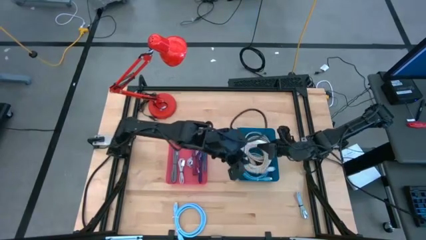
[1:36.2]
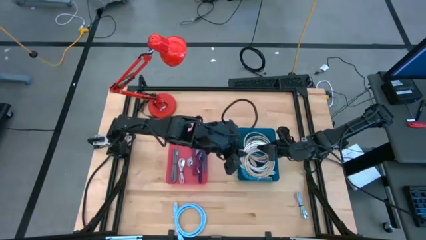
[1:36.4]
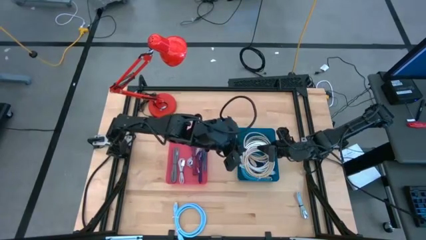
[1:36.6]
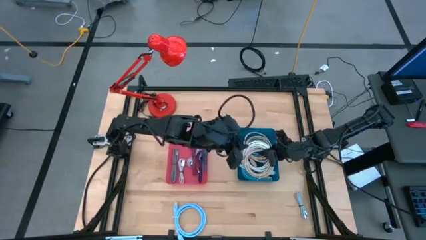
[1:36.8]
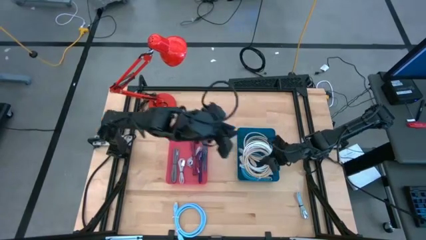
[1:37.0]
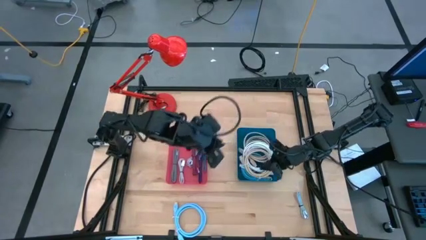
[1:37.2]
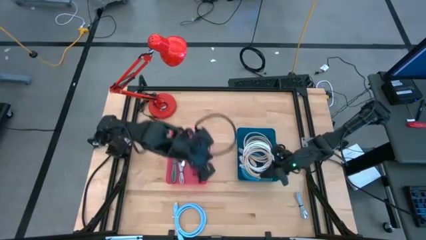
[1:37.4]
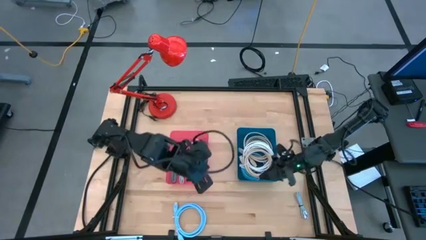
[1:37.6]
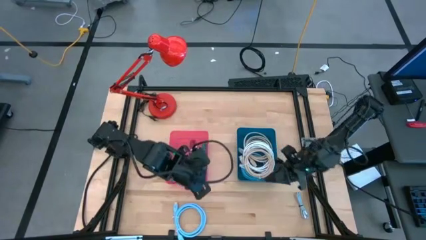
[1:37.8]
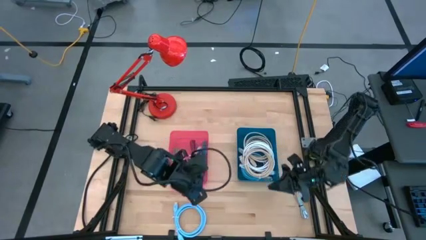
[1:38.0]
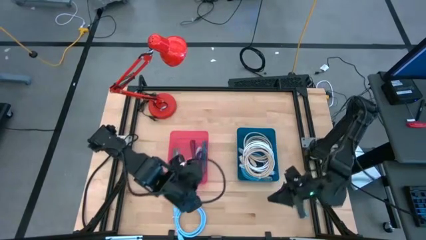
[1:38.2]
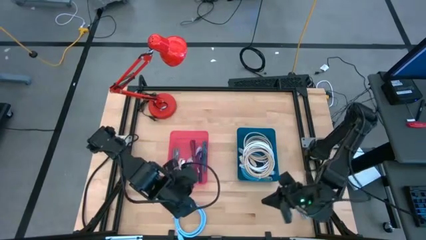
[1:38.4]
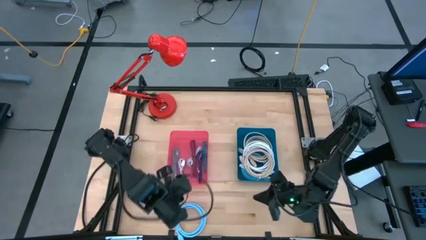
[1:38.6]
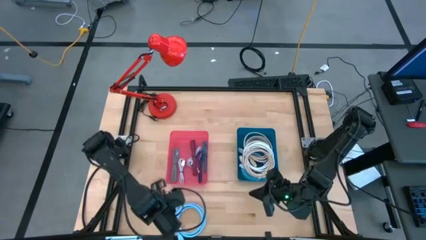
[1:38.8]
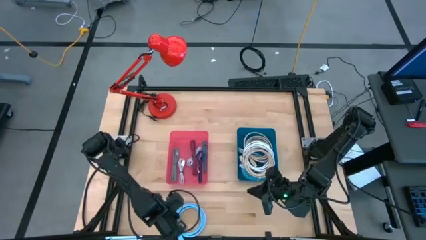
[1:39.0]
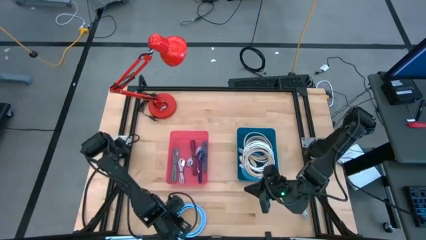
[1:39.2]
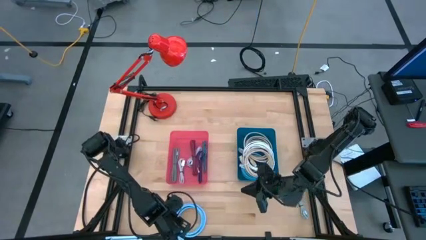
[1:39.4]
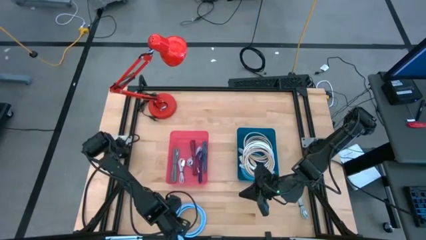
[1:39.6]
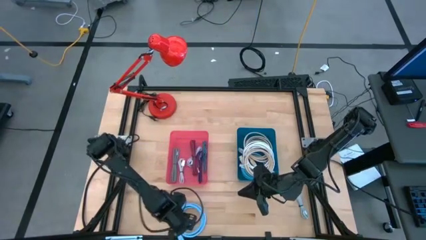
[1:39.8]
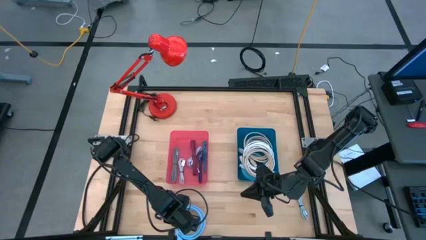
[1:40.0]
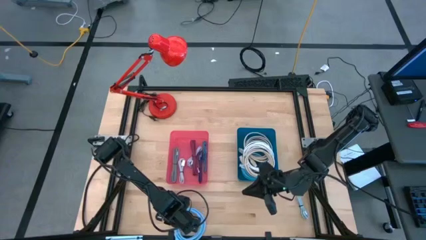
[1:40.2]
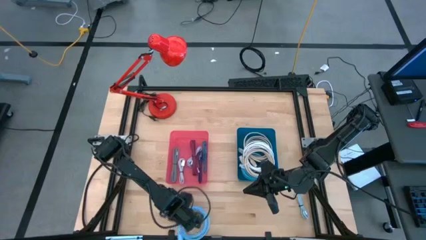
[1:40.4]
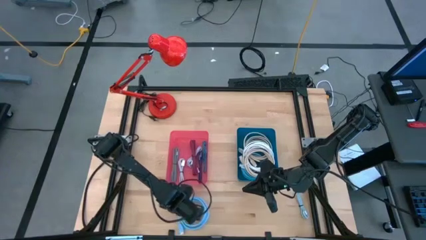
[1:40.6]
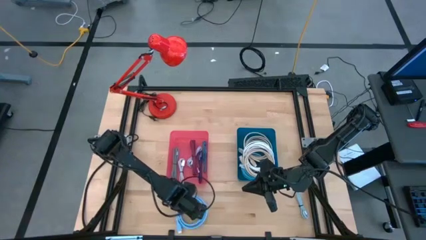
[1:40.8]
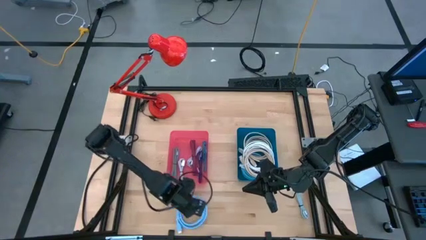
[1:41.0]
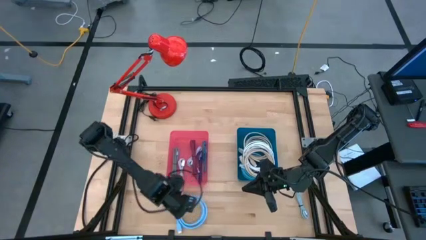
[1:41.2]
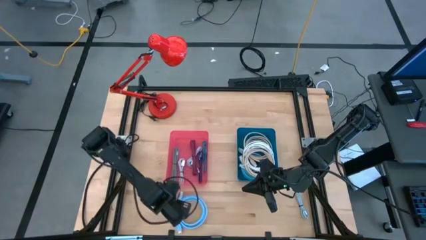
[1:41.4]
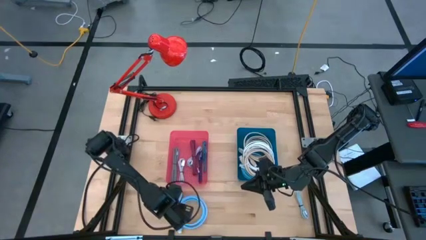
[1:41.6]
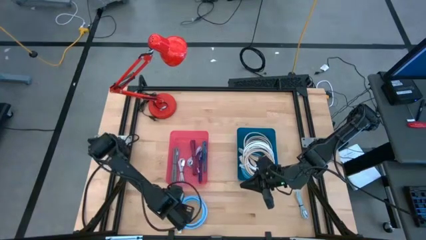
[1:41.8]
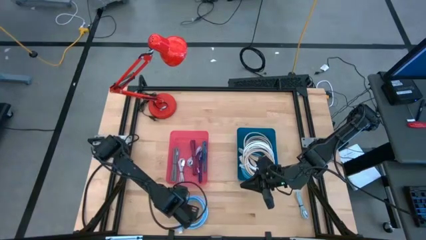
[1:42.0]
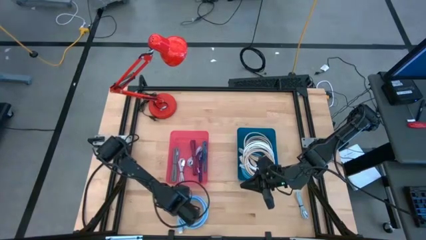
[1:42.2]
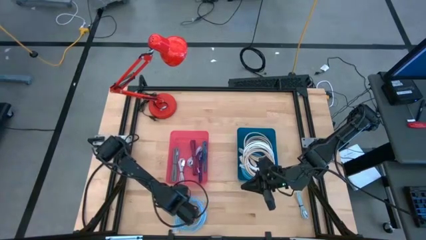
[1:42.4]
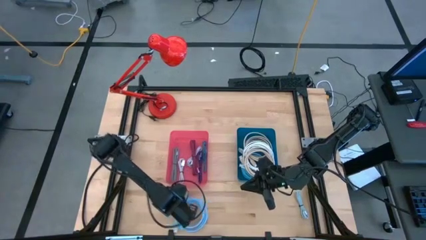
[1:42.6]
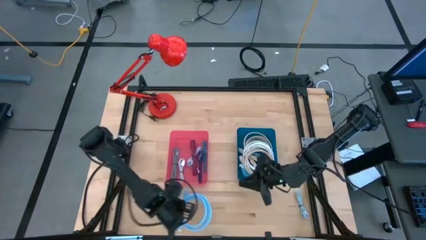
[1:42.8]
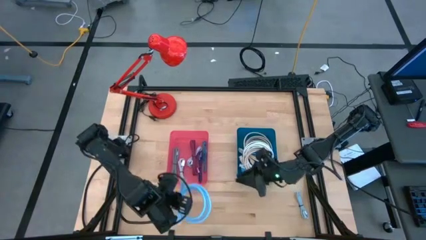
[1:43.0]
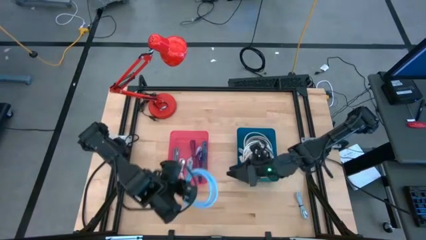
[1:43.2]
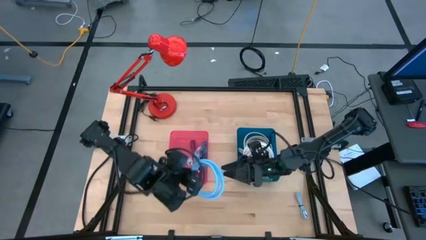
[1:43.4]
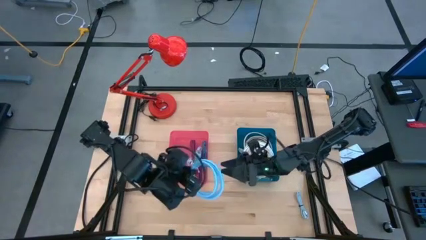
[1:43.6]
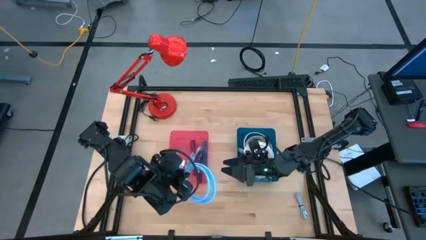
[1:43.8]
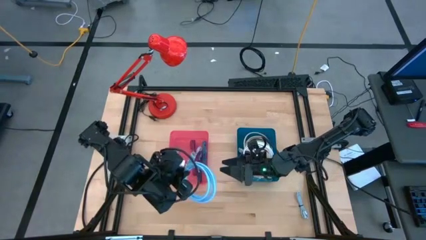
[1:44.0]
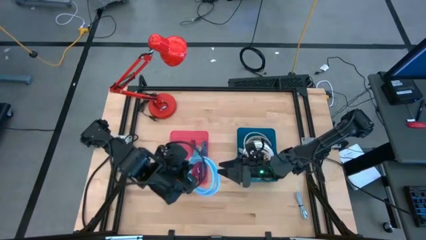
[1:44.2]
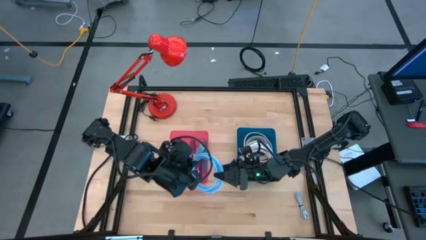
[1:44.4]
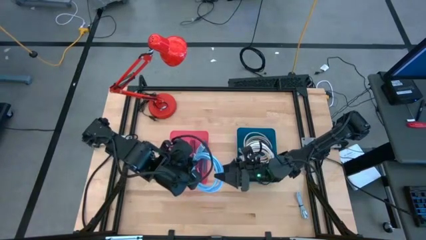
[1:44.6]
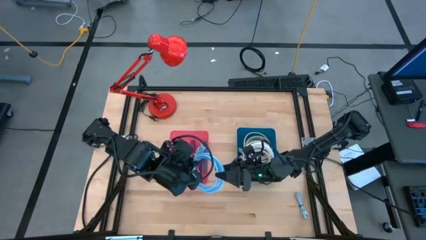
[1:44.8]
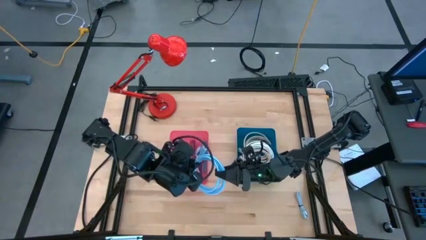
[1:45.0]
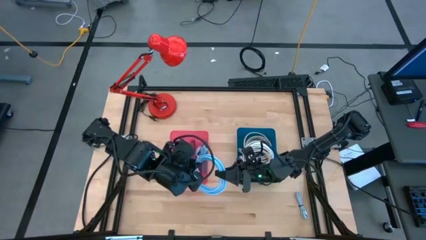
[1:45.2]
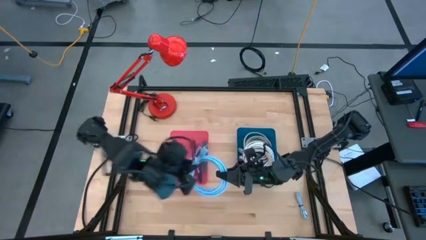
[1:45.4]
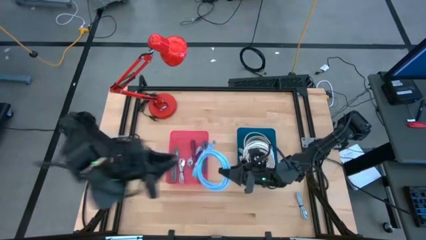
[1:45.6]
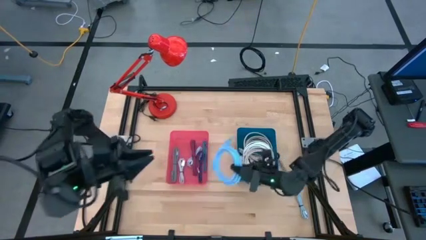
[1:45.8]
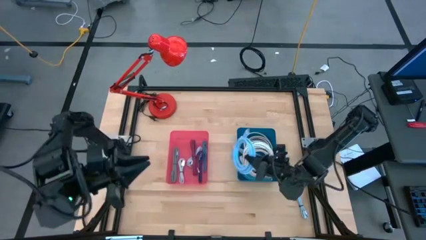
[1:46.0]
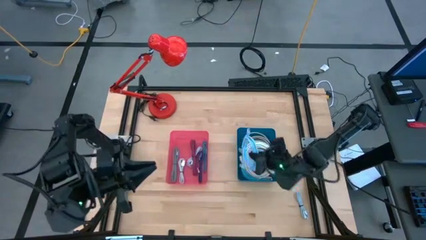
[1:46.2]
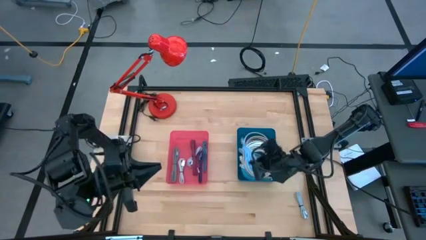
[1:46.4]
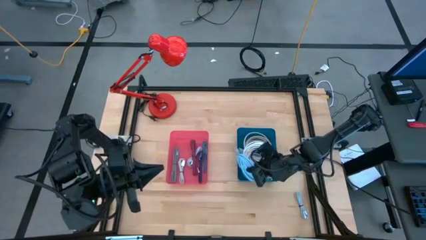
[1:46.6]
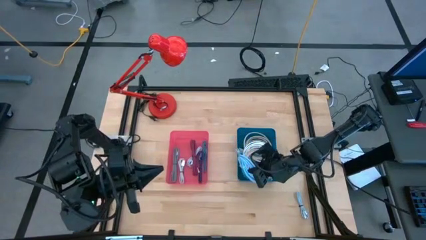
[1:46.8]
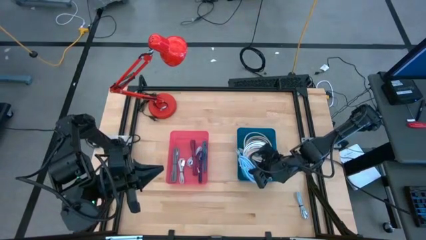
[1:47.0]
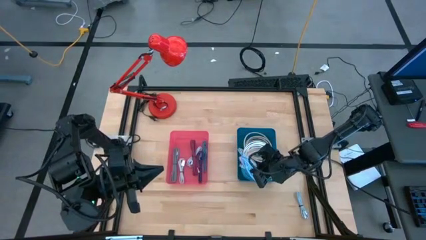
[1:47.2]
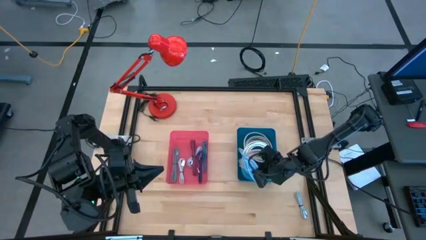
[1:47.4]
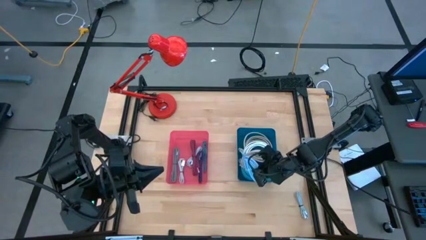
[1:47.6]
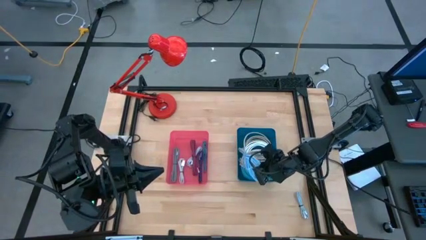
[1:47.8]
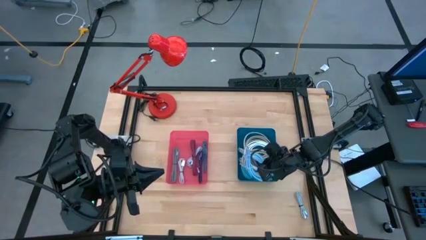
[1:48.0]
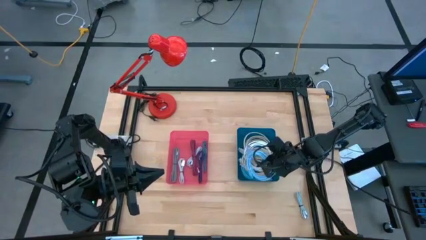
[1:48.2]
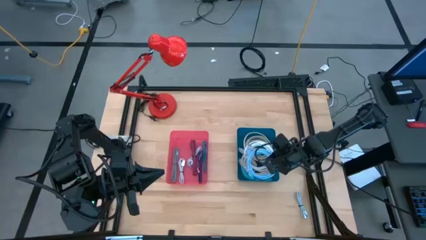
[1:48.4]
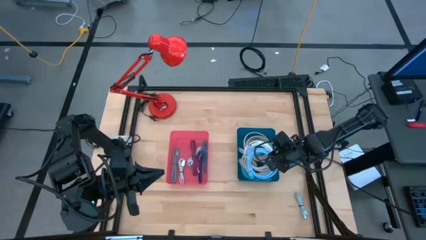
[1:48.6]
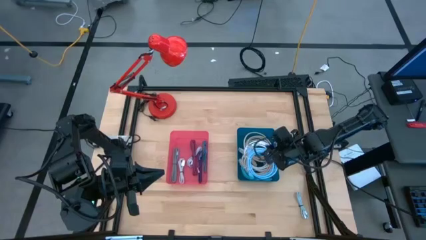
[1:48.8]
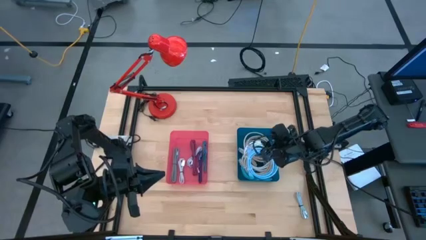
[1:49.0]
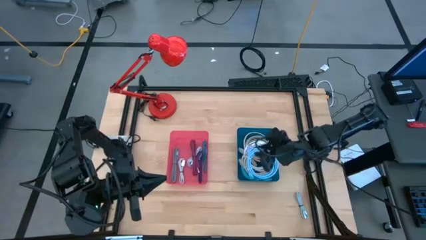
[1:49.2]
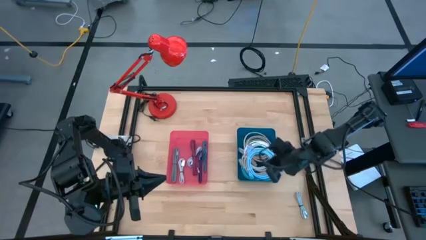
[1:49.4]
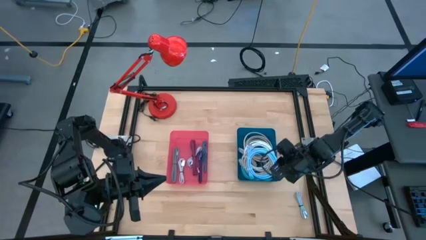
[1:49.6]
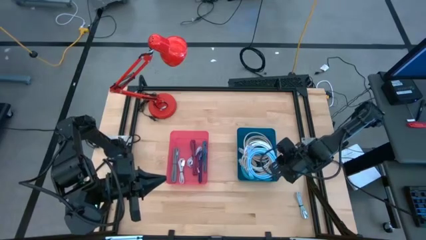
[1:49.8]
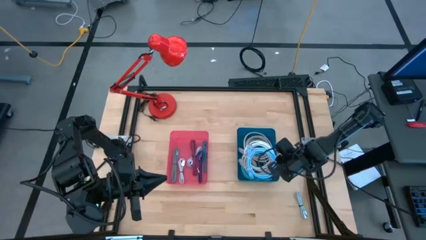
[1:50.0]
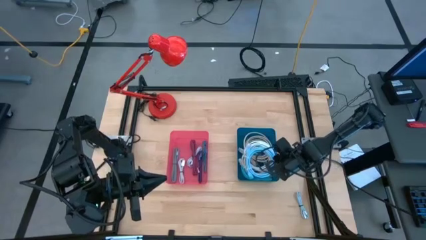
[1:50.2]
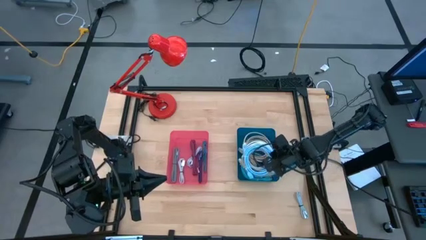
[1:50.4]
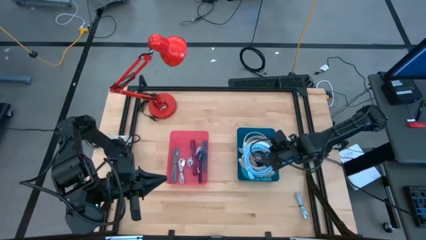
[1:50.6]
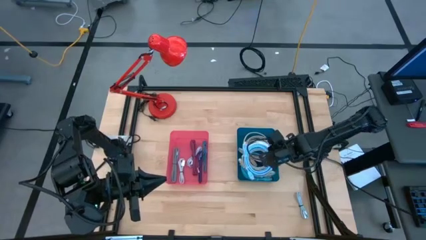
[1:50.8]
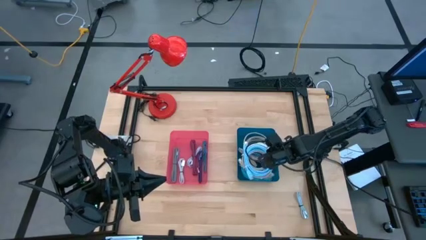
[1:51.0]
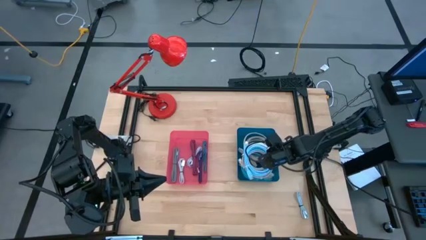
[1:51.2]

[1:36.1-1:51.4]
Task: Pick & Place USB Port
Put the blue HDMI cable into the blue bin
